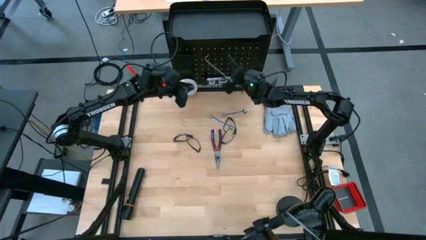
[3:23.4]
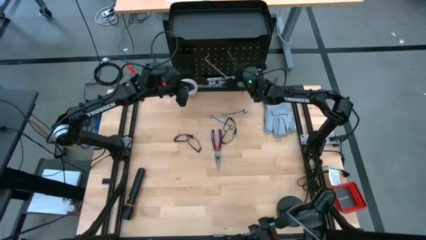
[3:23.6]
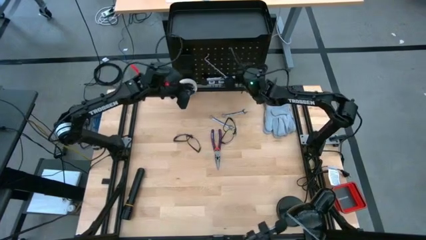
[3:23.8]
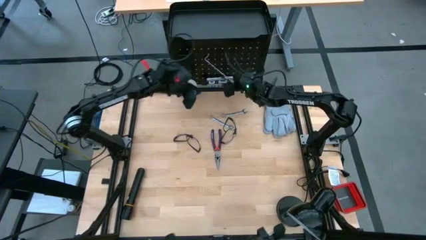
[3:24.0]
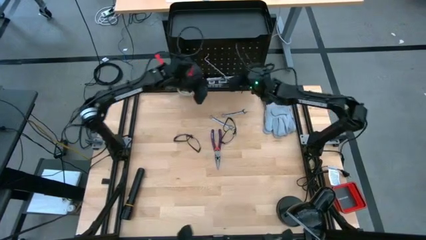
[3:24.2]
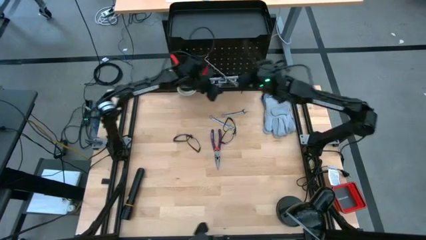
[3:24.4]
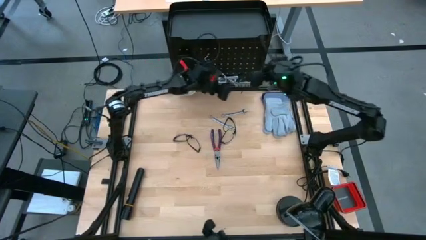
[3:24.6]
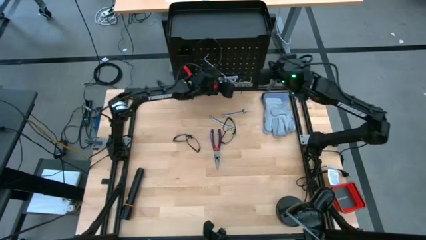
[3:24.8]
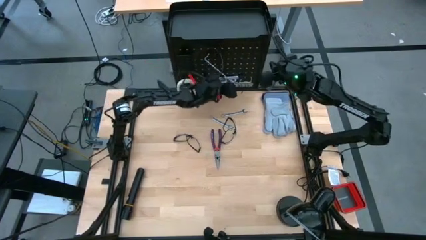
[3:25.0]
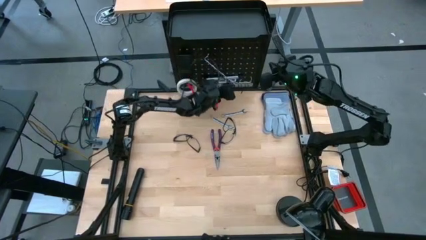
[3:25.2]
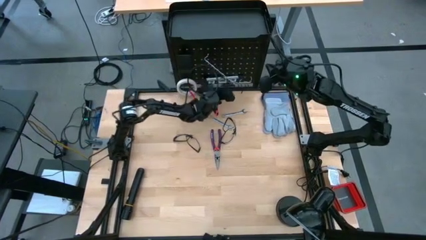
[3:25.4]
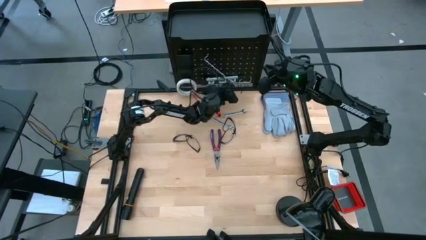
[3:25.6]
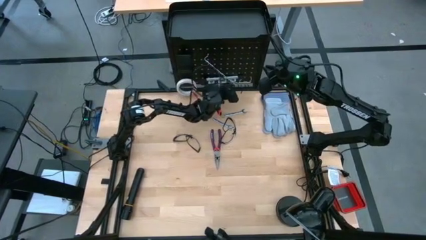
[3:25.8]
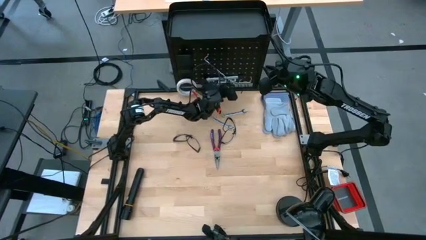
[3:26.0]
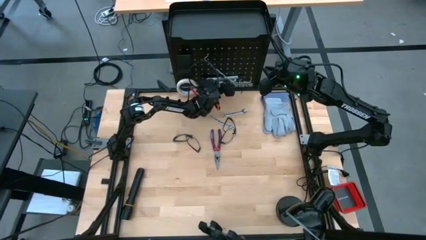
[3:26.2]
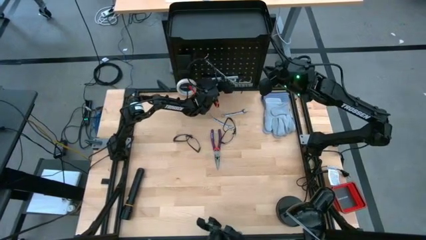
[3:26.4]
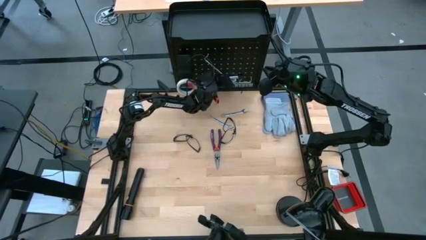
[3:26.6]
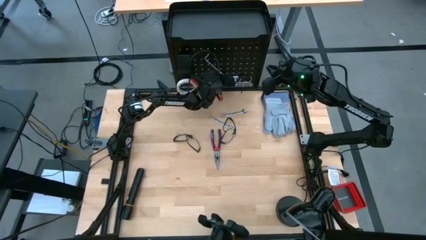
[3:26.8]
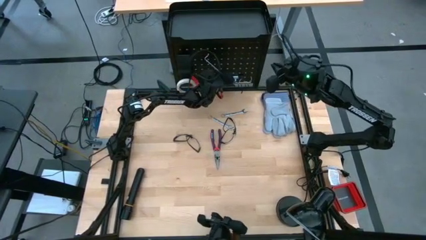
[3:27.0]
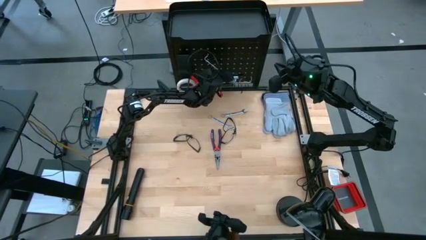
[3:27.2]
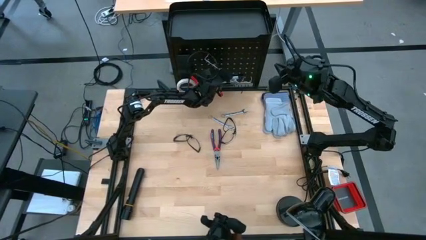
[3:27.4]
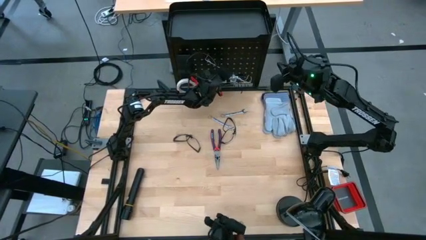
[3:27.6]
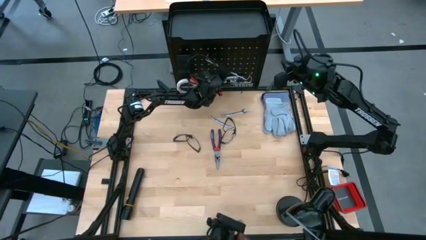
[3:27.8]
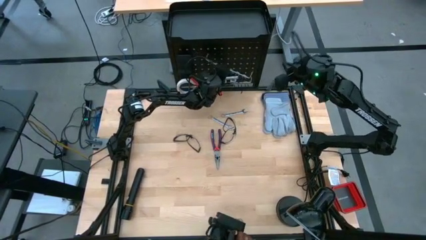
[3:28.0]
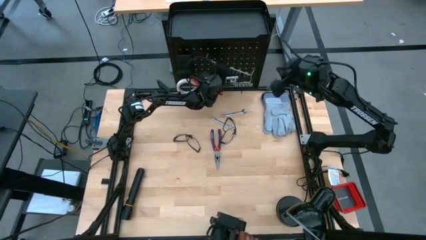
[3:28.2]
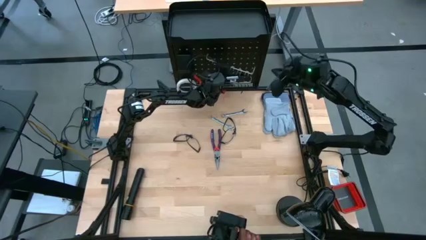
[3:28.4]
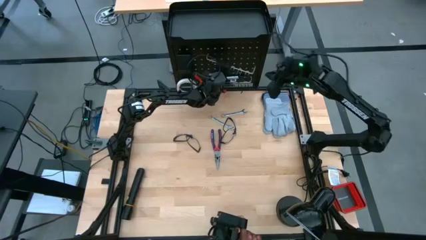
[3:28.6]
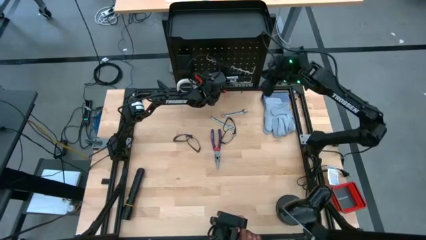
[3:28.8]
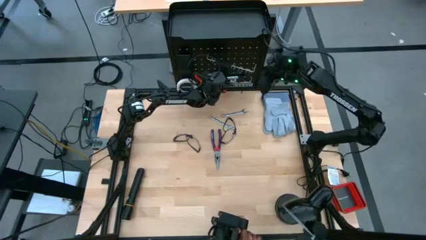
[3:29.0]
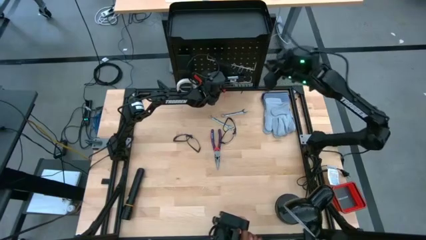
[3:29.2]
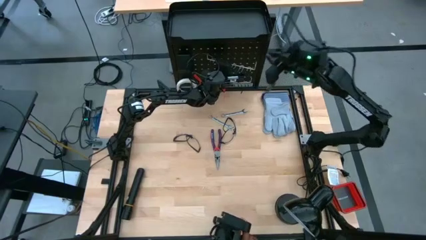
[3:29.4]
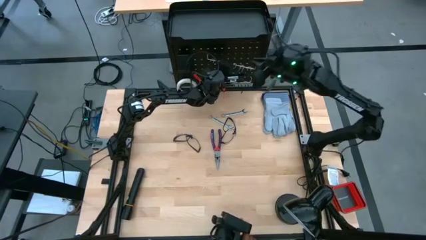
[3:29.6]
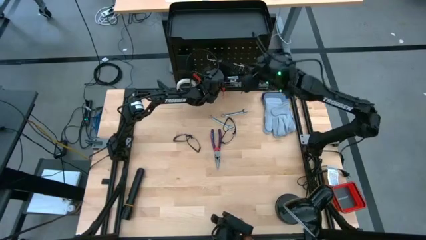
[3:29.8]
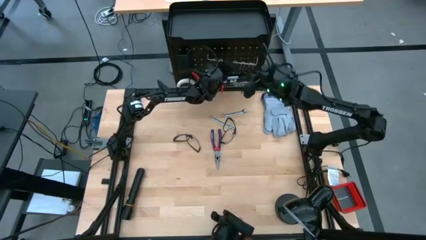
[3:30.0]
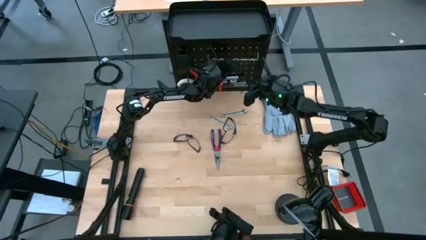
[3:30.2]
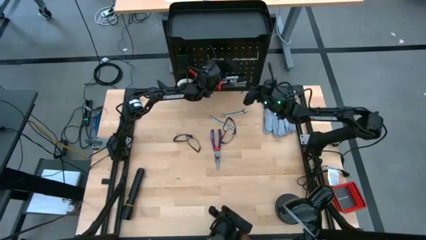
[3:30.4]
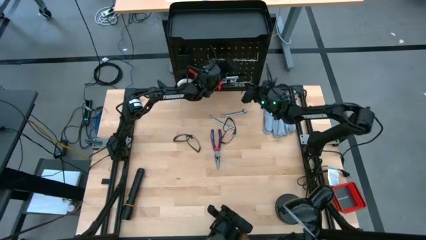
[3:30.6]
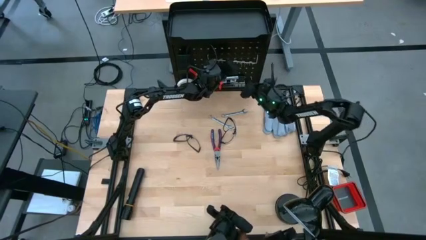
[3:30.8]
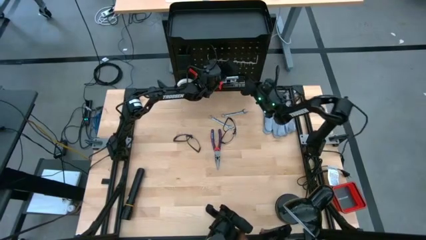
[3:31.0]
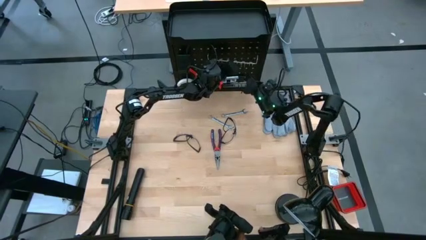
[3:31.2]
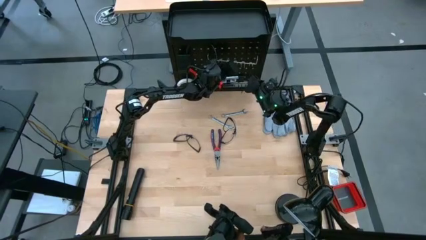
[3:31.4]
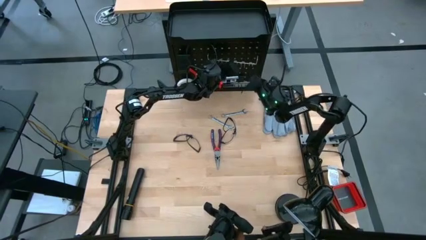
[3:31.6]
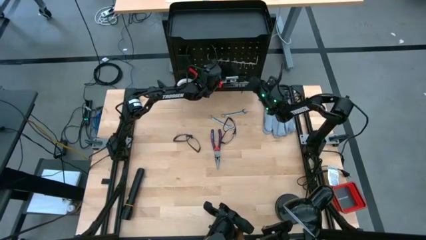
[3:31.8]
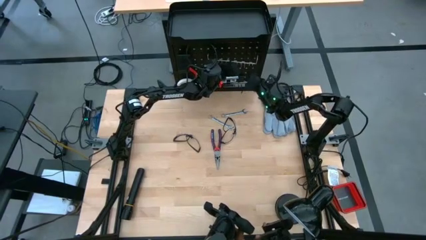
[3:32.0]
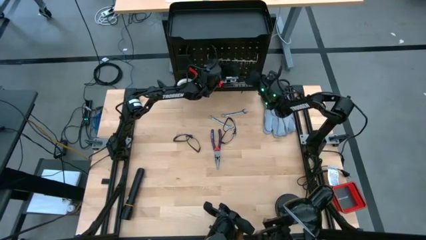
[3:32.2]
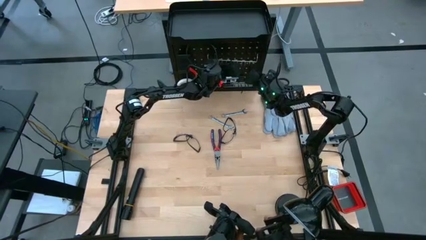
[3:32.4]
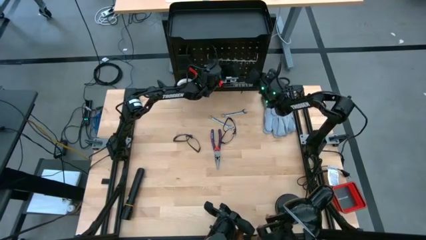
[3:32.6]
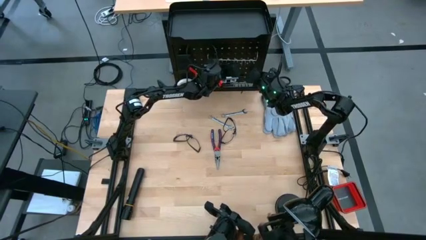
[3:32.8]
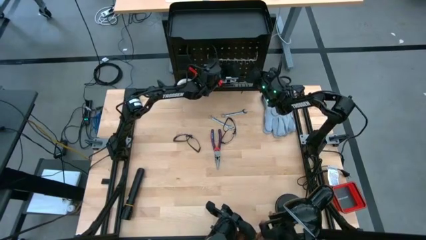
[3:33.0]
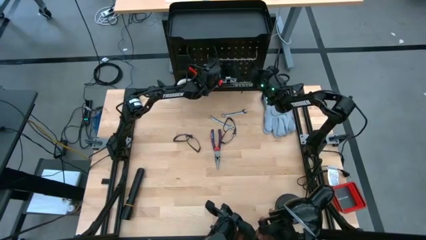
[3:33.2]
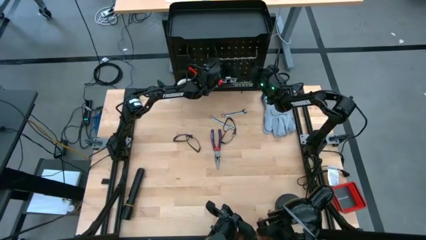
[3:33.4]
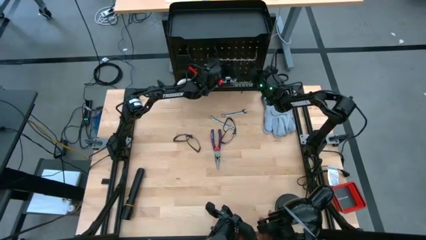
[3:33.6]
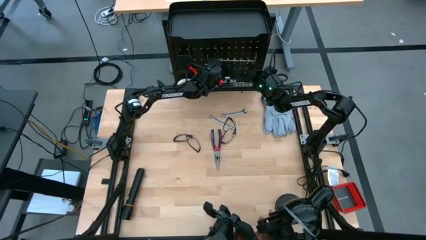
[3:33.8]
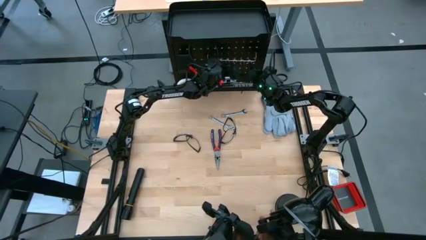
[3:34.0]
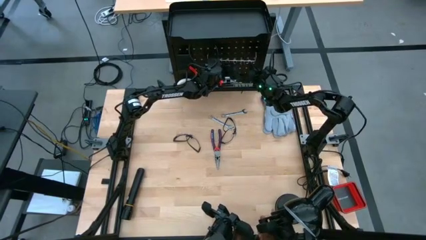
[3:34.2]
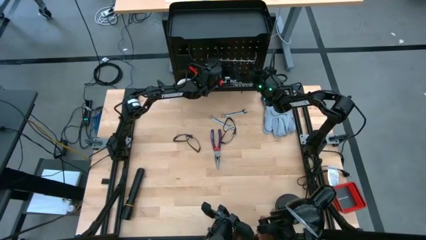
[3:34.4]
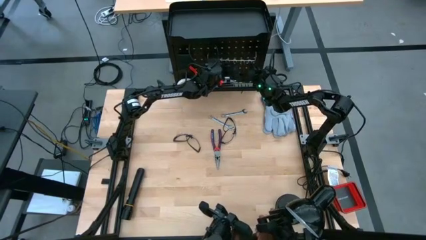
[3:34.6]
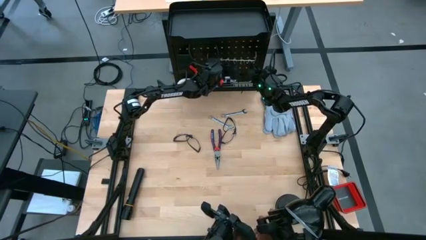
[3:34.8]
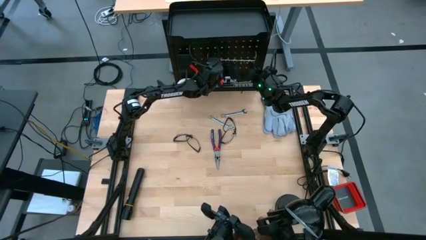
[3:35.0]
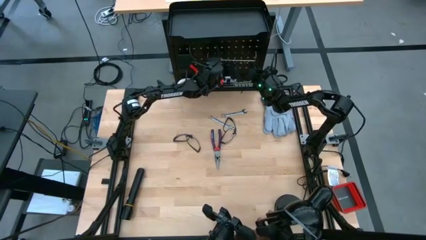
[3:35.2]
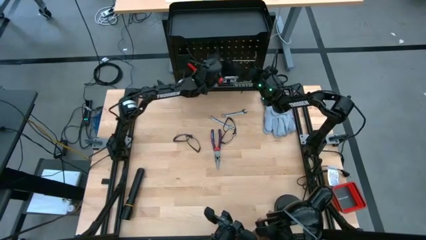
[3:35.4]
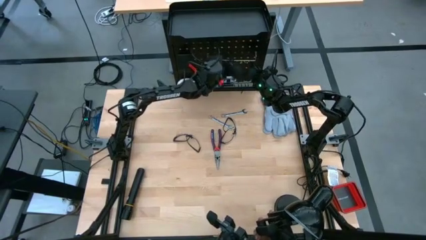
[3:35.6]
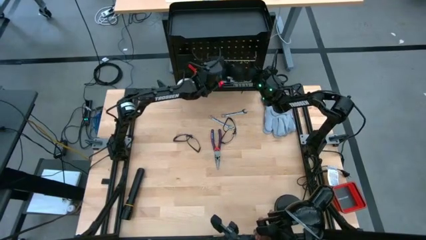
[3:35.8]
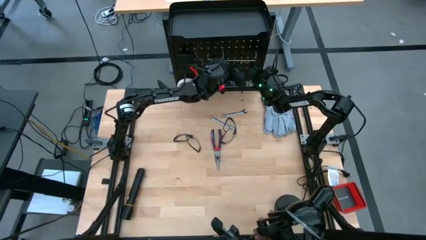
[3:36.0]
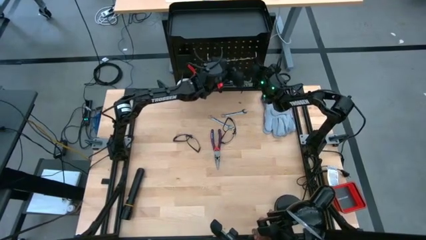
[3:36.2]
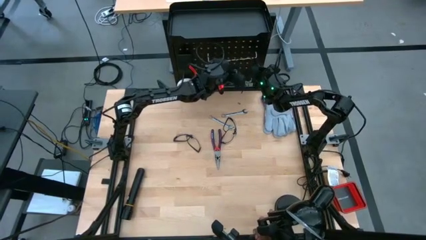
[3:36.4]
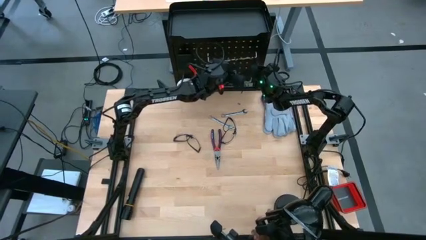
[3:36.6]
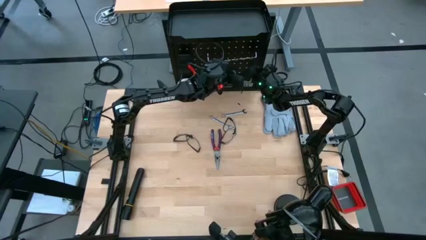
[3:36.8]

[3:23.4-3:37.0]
Task: Hang tools onto peg board
Assemble the black pegboard
